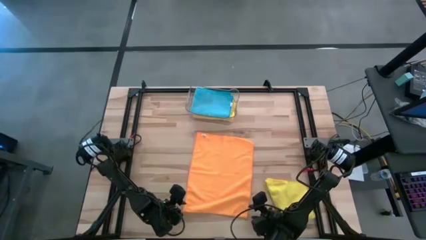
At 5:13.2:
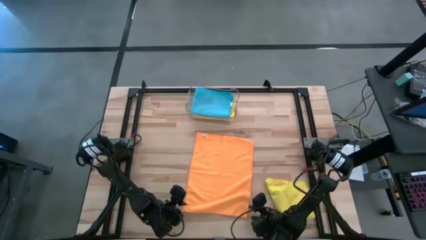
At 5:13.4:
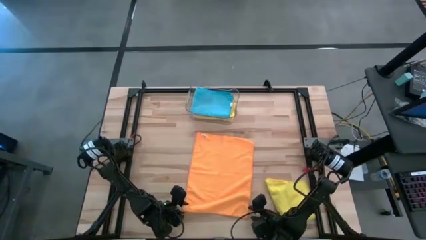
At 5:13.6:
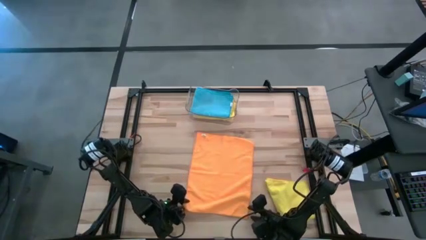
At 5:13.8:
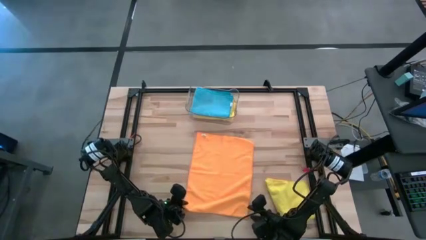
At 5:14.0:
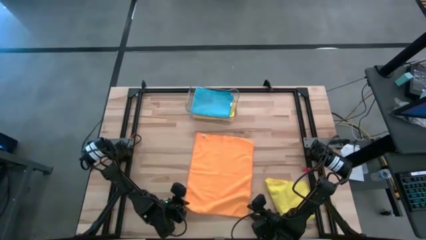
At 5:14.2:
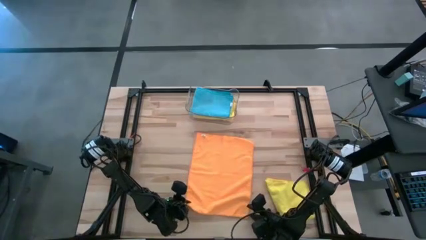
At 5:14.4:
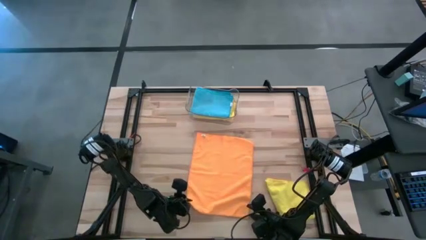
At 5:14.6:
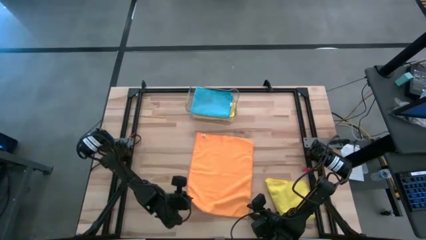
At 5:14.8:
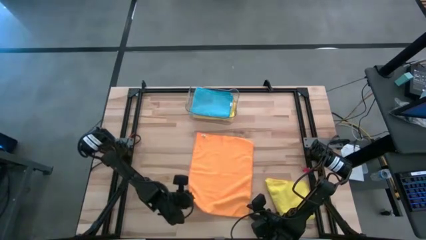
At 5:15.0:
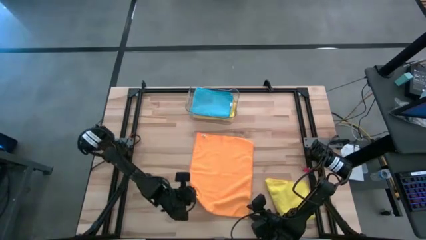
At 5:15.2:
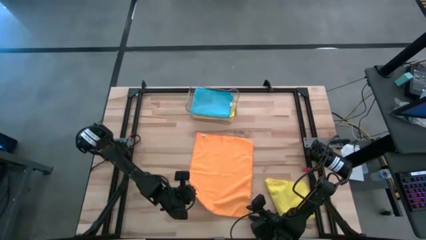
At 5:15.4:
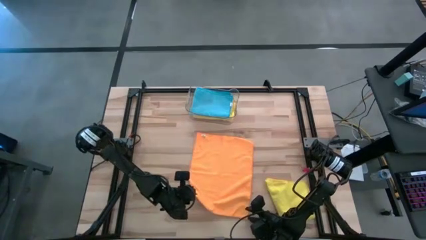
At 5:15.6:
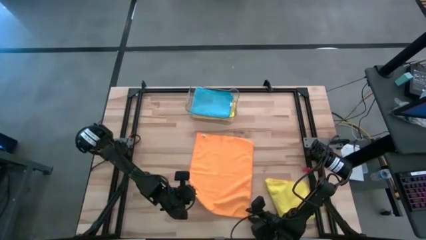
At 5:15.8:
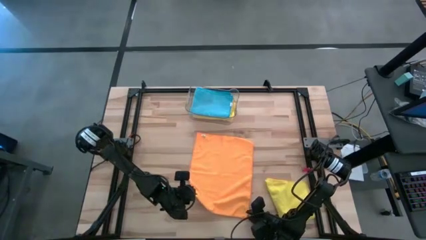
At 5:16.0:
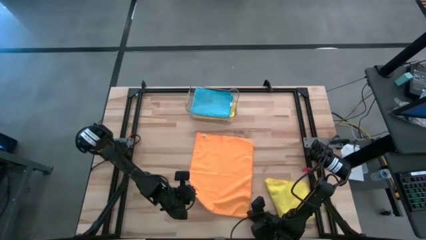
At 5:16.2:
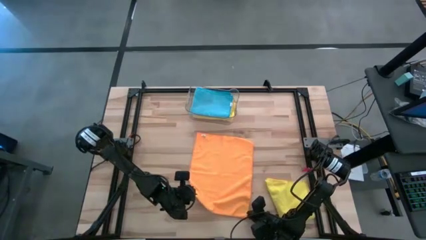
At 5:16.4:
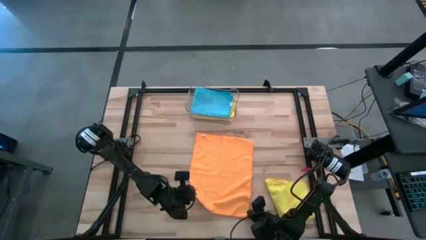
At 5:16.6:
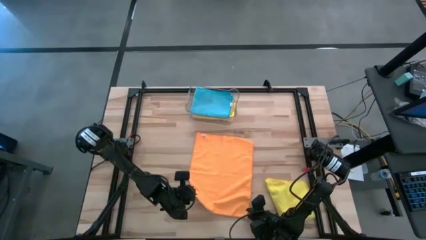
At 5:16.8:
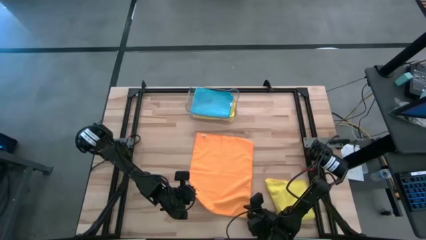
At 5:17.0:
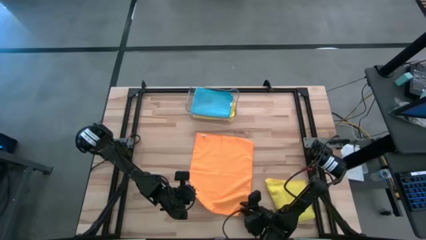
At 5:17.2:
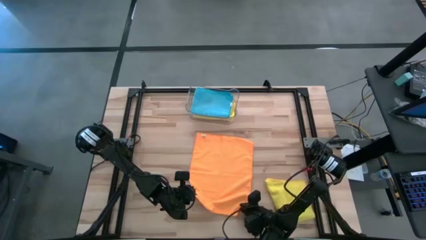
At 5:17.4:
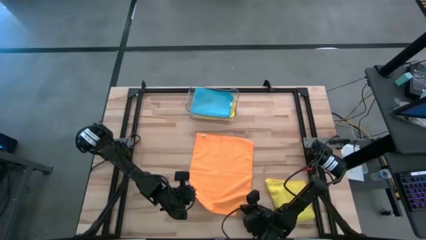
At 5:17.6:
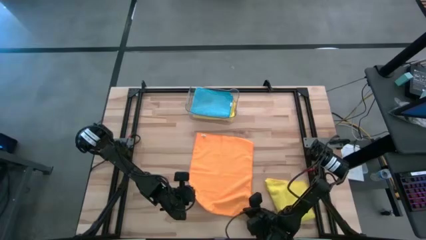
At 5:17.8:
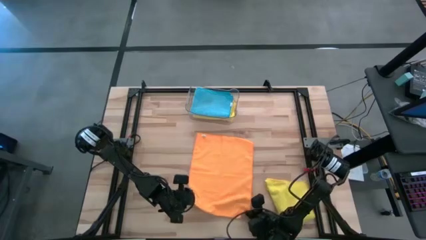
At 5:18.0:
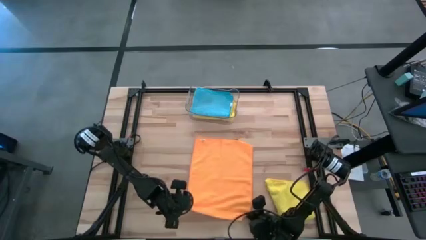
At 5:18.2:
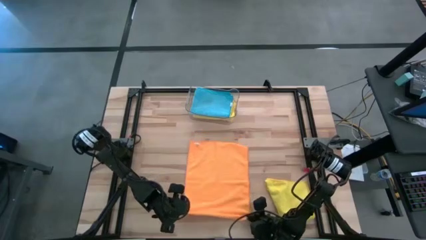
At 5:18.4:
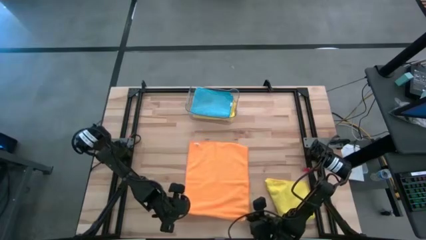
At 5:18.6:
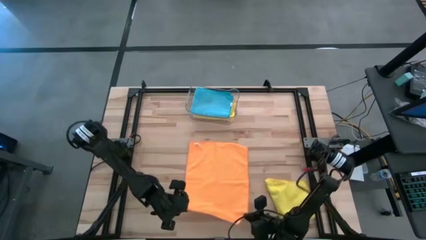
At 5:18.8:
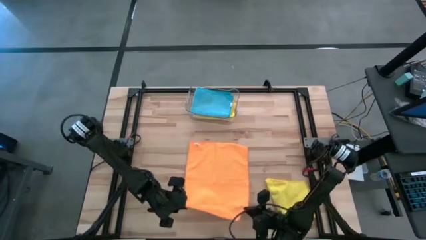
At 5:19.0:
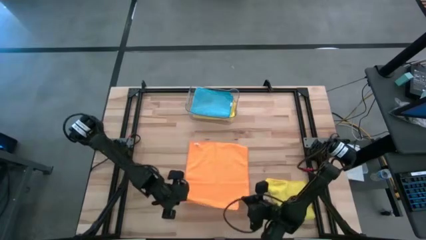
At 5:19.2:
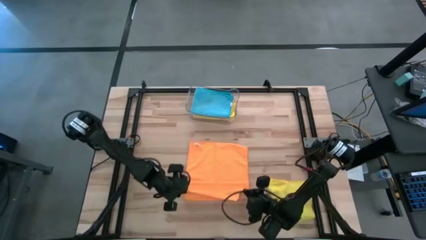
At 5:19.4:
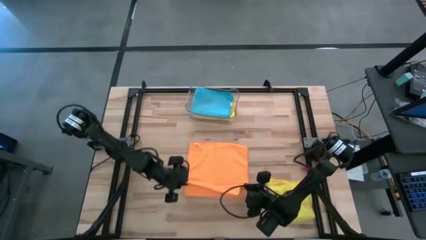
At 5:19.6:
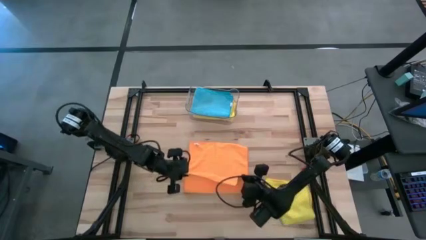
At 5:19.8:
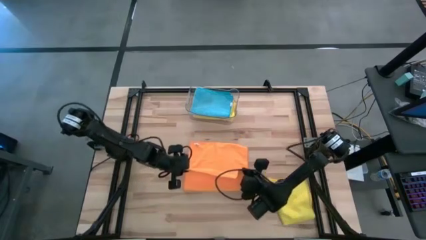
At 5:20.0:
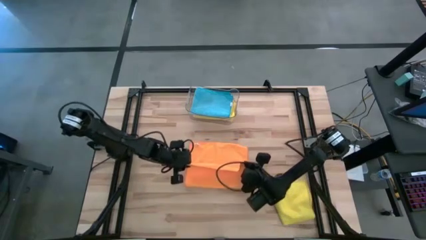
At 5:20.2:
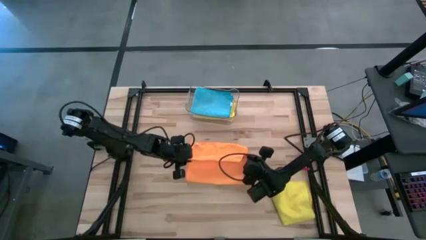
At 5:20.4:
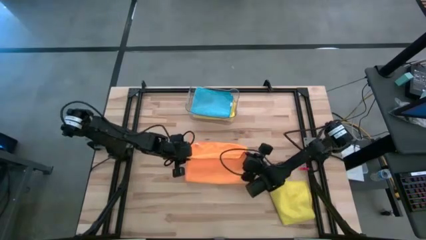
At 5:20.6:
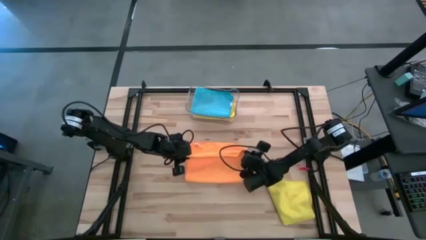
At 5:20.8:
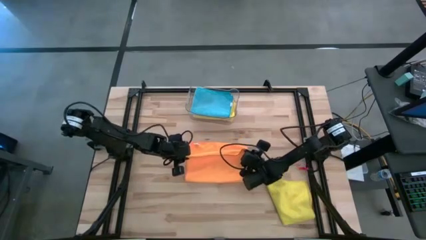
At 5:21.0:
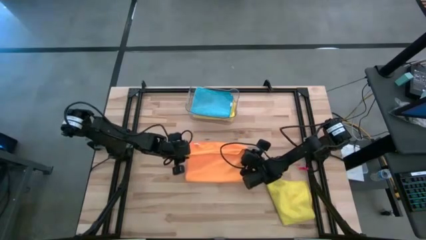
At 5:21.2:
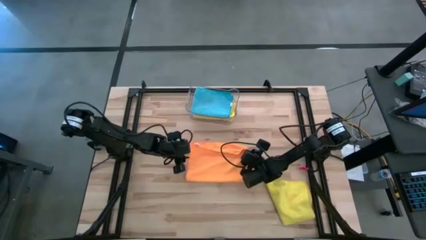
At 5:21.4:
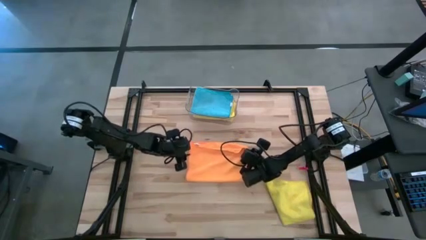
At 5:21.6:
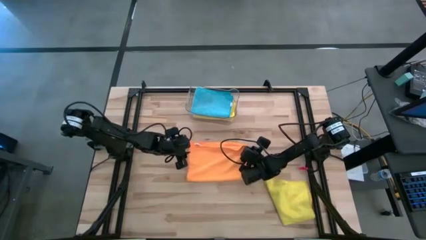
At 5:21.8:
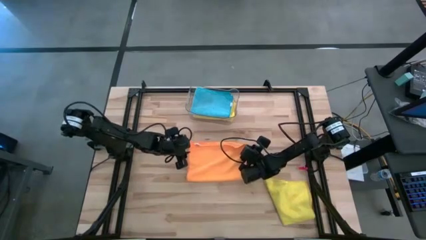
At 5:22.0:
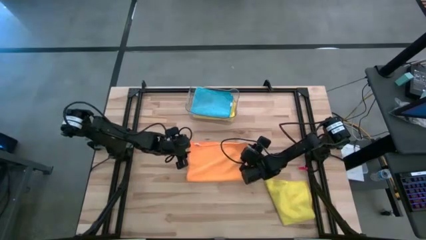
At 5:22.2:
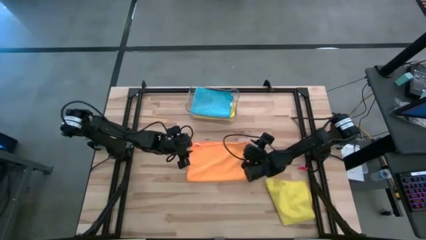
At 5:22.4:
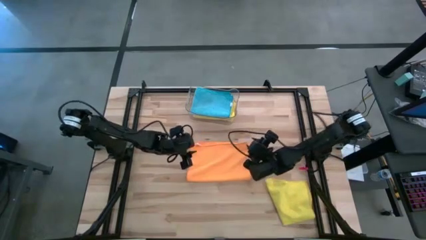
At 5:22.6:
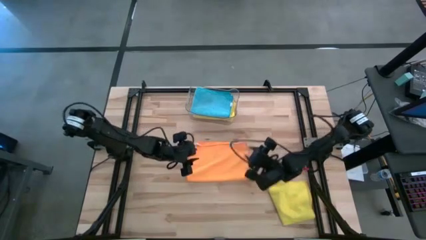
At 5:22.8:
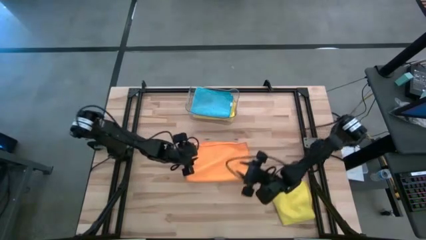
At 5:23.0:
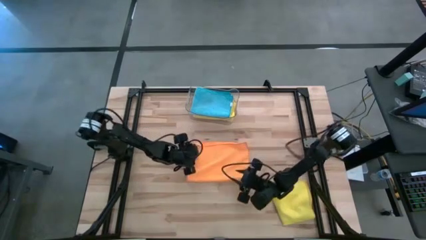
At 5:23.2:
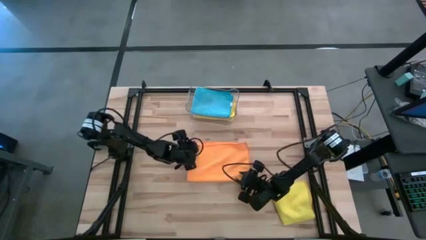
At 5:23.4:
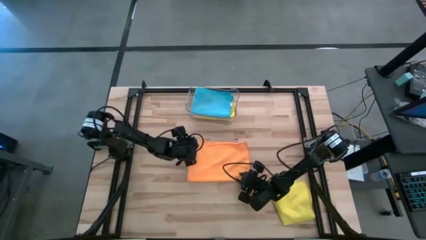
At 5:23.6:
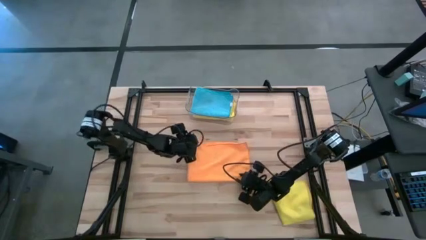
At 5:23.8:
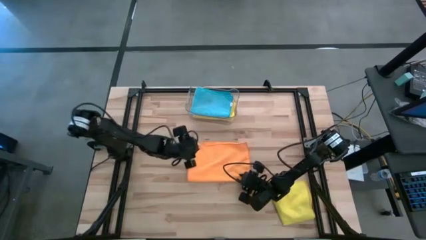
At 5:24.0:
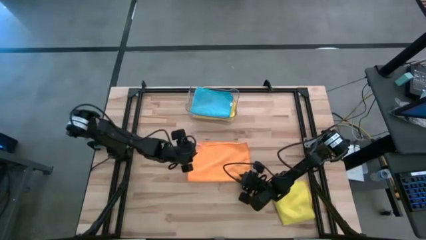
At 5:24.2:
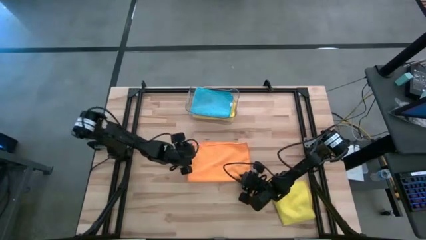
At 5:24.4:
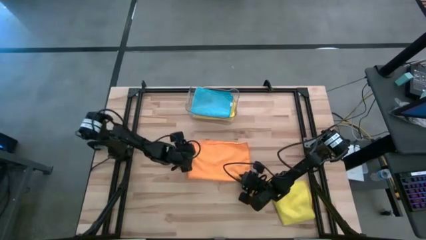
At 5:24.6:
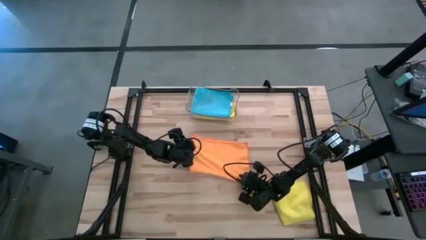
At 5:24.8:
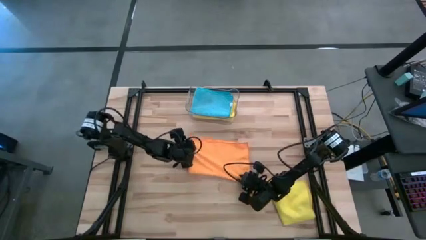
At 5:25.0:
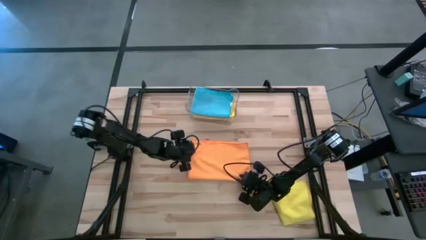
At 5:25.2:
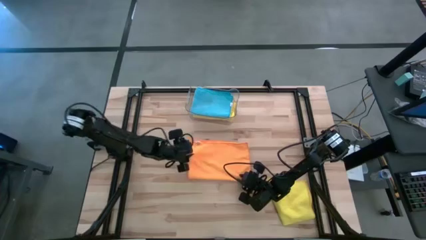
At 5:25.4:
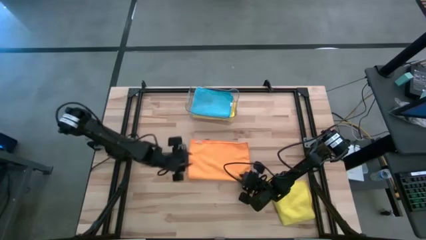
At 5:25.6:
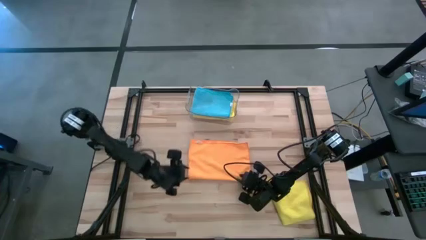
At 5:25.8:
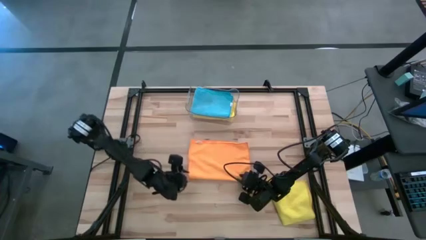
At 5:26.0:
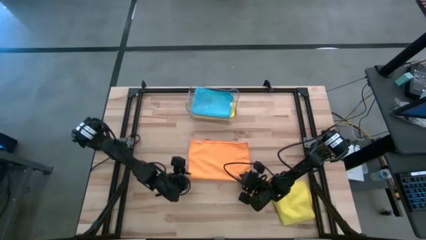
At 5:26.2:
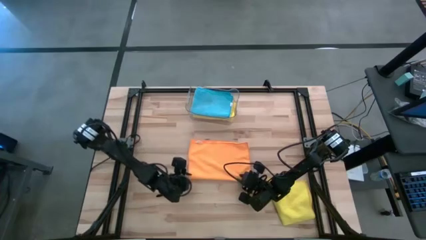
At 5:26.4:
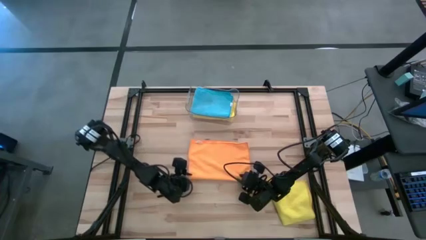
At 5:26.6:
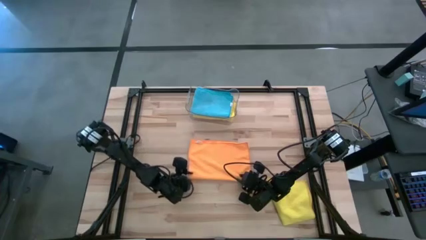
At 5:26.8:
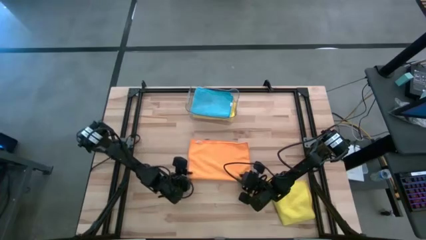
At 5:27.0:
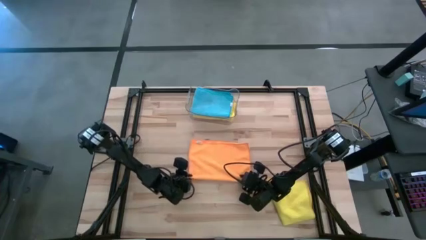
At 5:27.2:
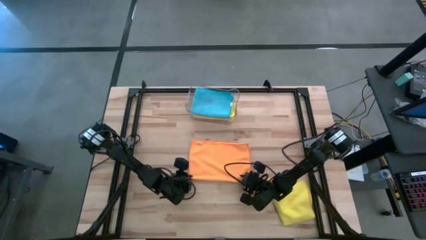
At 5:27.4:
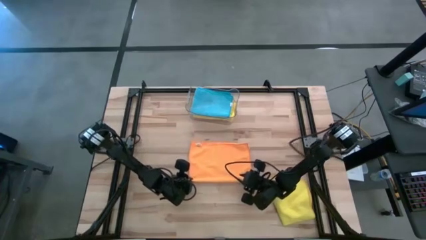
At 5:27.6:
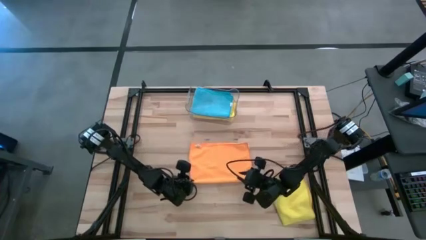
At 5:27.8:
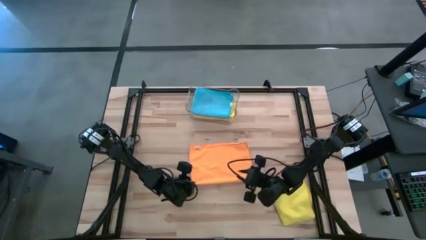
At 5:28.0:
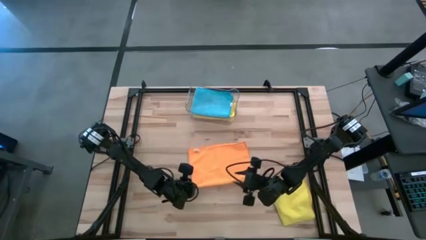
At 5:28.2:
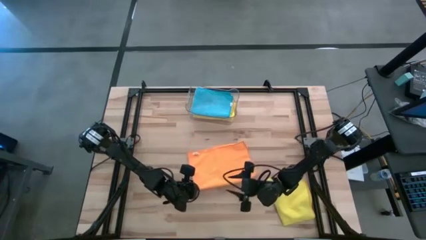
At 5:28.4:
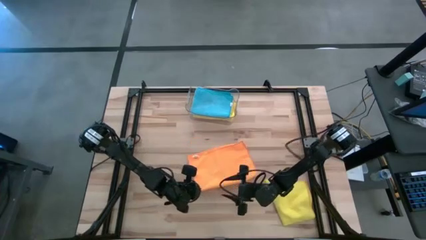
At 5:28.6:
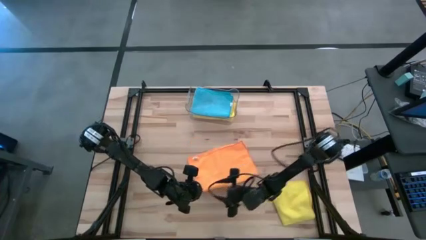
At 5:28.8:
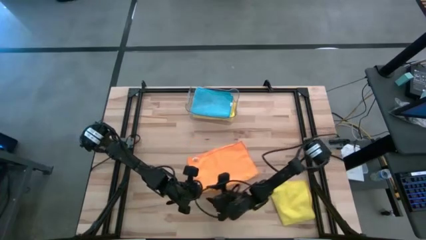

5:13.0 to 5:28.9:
Task: Fold microfiber towels
Fold the orange microfiber cloth
